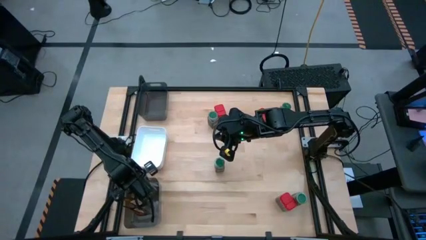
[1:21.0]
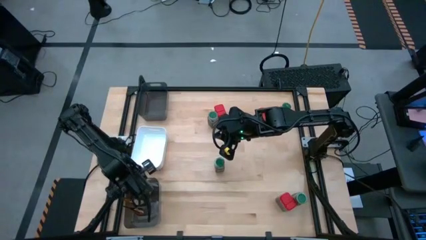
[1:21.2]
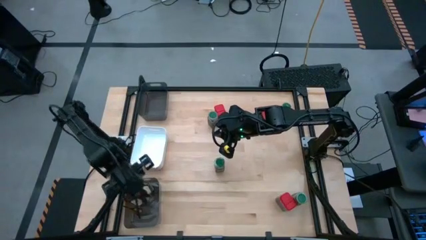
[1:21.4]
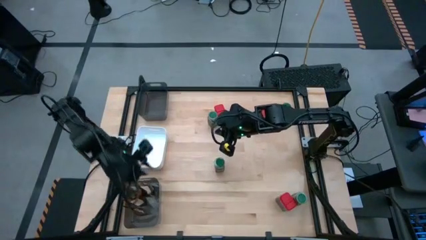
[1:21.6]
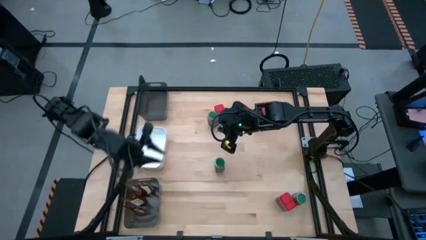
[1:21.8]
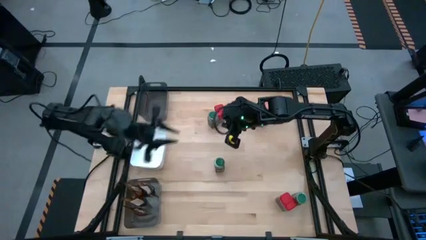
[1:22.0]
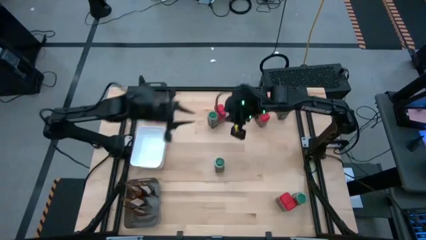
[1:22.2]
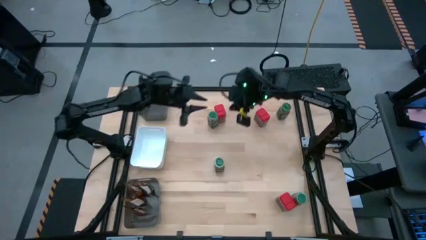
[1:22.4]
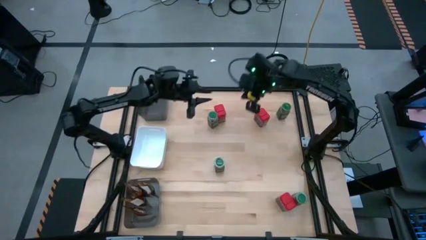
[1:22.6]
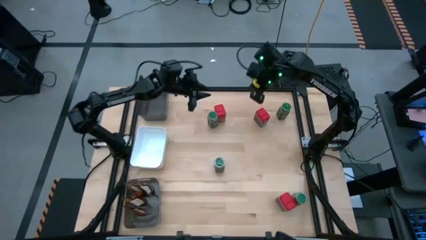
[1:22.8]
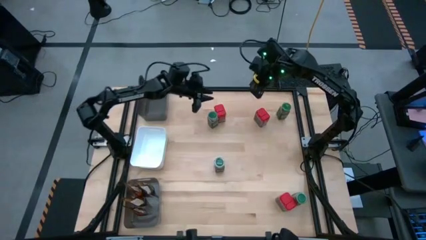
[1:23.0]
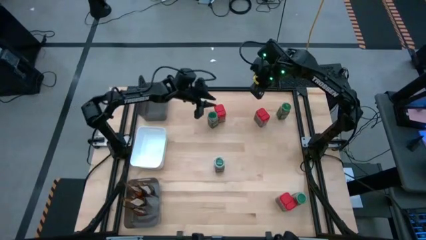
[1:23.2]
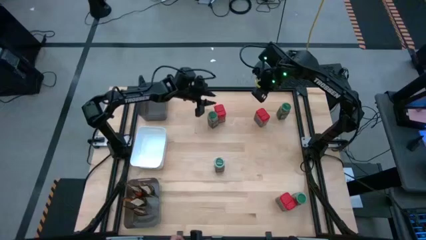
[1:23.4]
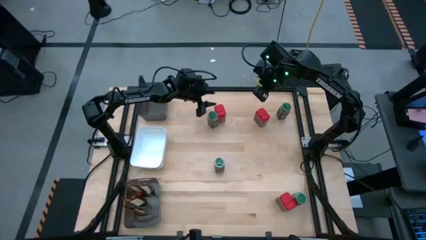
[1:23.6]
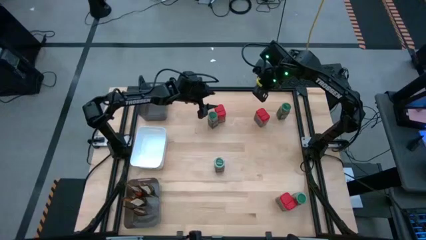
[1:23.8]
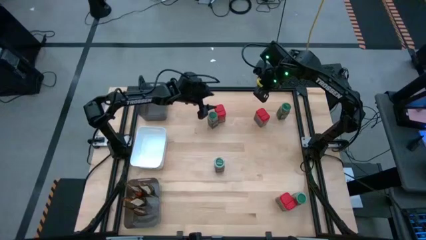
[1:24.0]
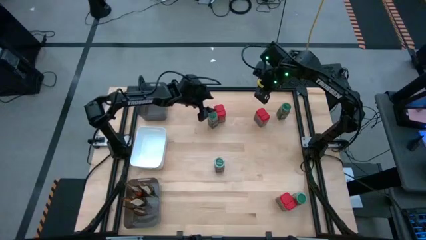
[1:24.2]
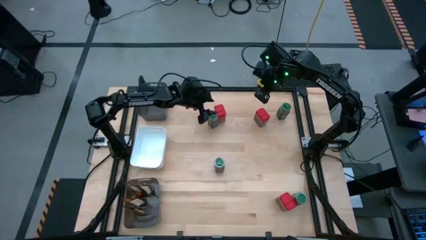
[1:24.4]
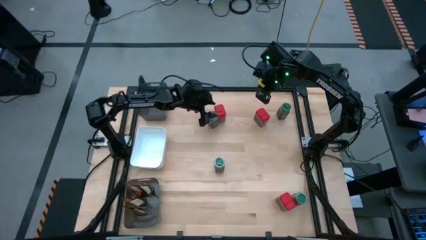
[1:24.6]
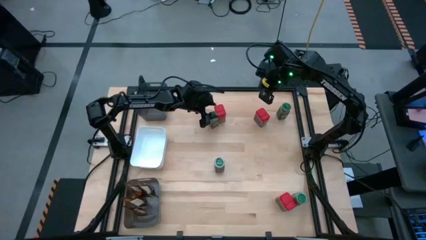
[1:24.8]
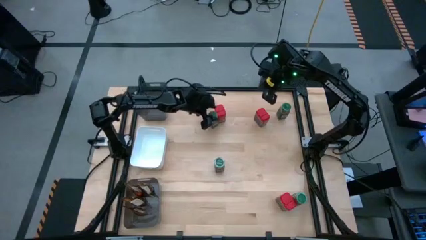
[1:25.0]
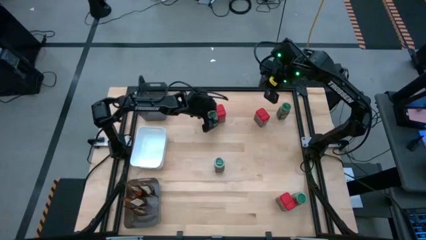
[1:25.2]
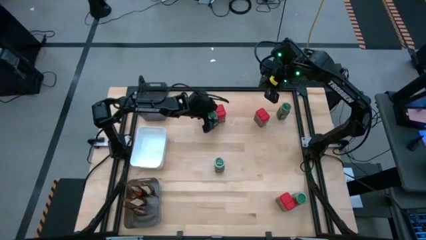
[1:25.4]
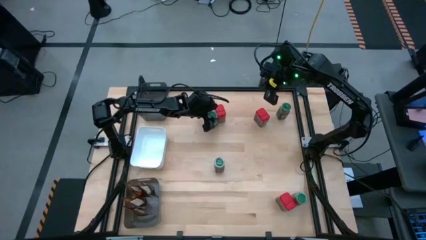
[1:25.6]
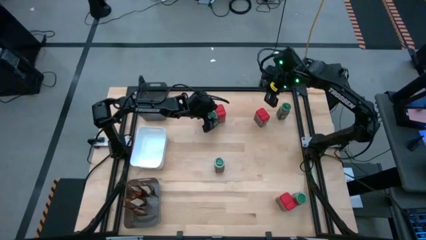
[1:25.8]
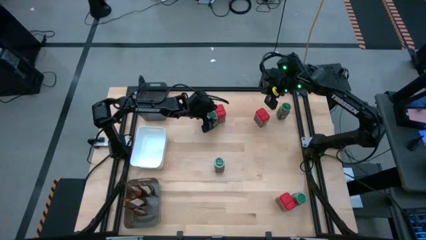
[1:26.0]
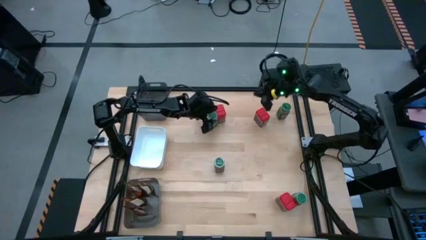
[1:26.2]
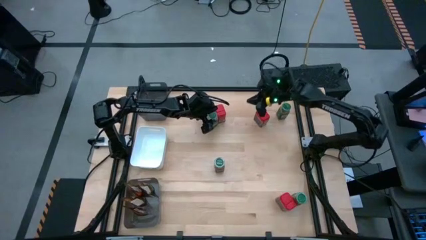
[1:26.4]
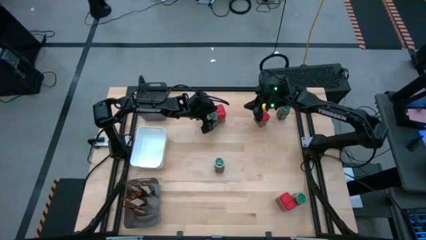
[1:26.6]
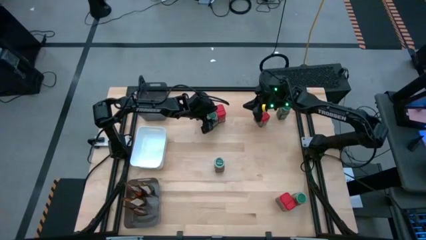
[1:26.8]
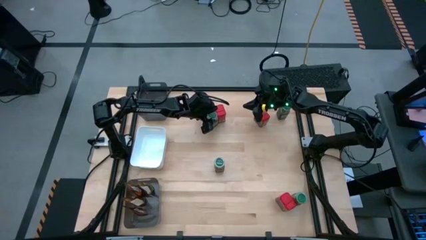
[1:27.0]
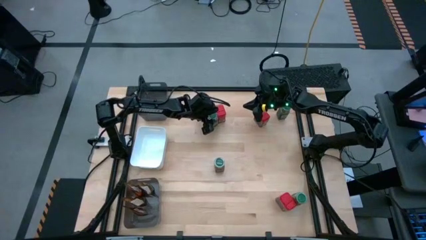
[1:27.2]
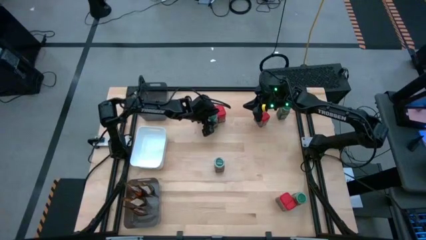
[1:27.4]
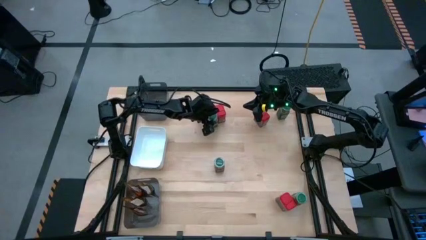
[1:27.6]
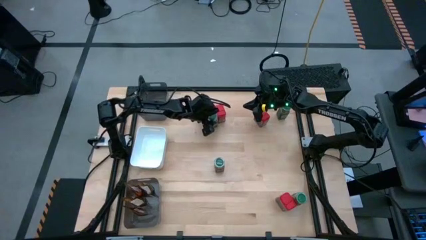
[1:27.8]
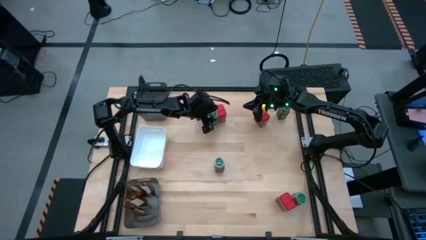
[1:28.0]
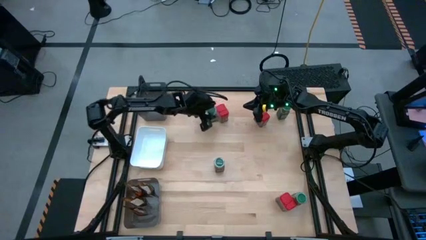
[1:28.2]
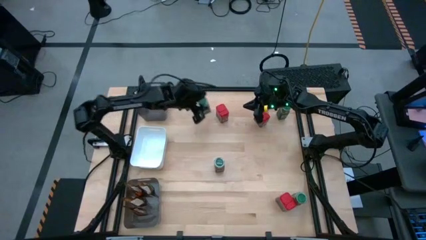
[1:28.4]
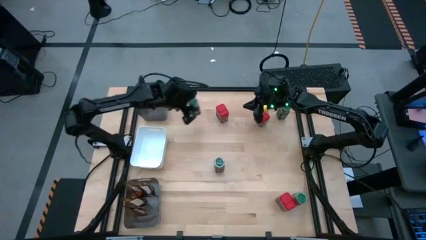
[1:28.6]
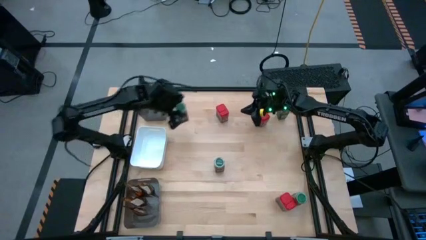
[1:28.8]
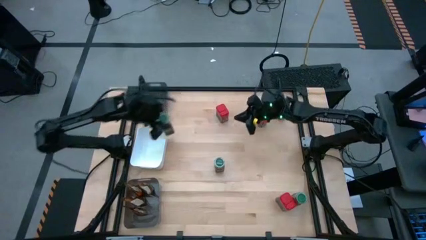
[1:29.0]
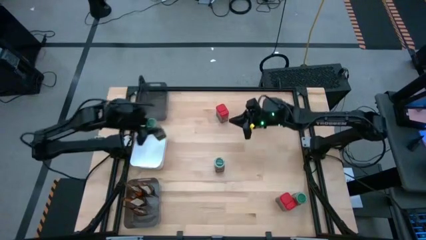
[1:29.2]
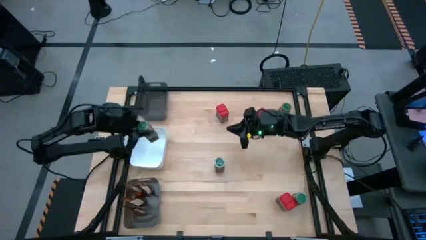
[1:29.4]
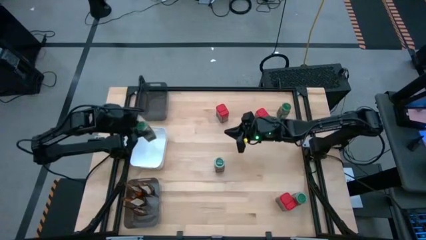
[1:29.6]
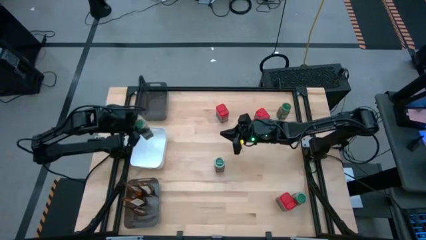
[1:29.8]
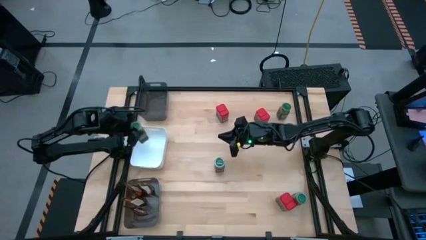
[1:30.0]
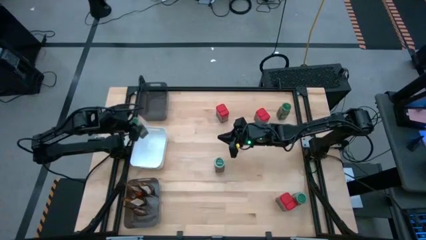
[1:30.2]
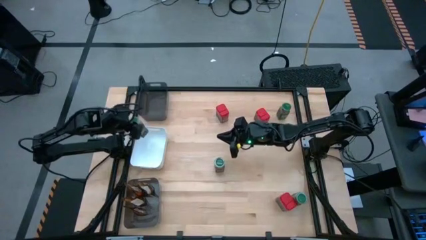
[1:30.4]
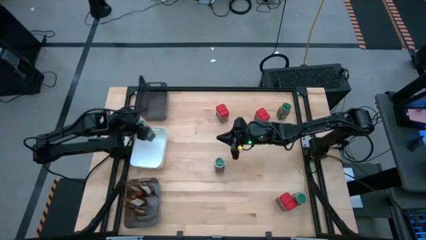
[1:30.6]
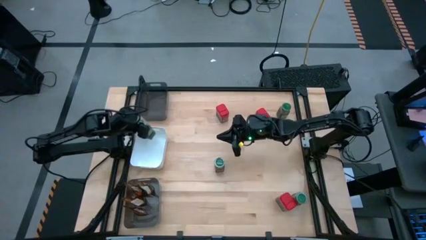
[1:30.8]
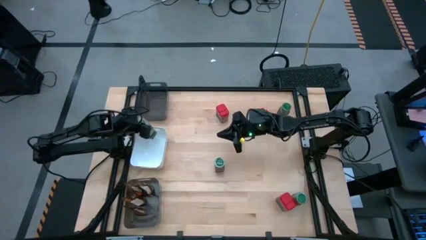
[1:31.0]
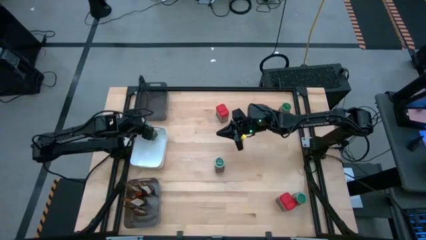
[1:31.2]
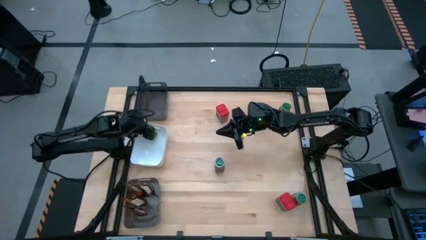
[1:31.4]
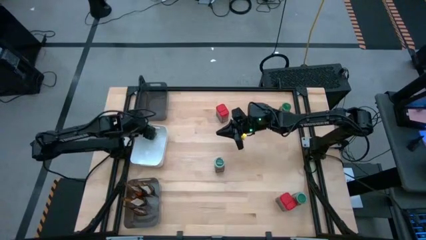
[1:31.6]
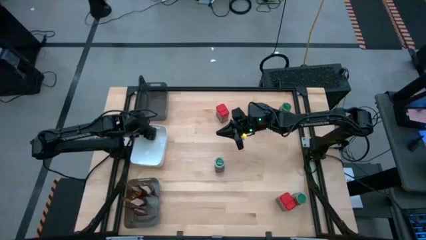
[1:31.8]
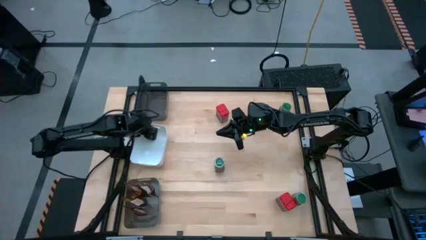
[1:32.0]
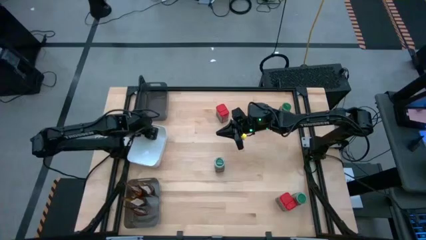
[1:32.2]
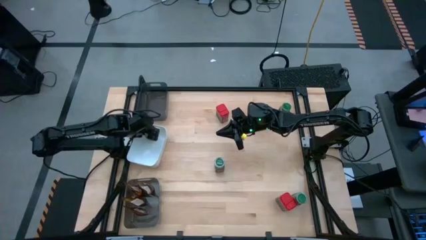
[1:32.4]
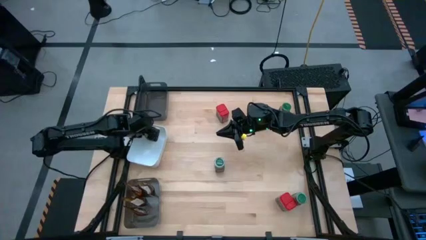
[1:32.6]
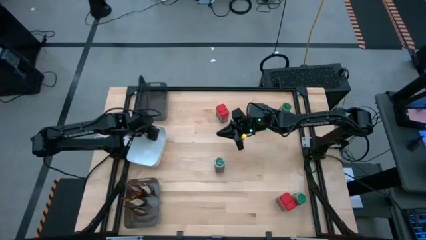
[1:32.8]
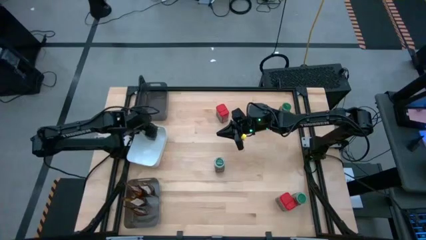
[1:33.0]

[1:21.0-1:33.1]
Task: Sort spices by type
Put the green seasoning bottle into the white bin

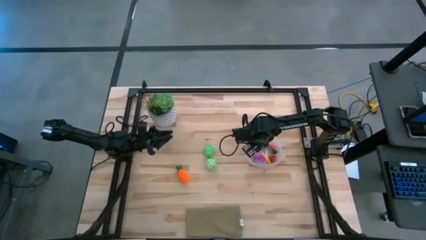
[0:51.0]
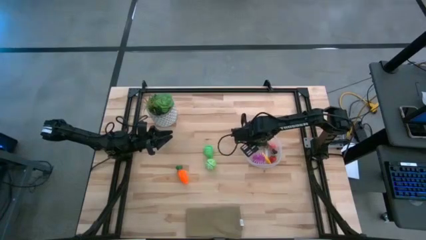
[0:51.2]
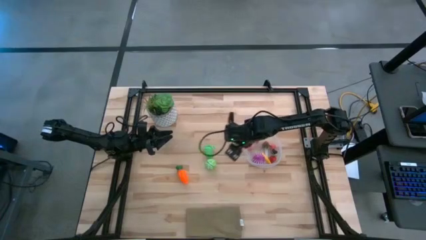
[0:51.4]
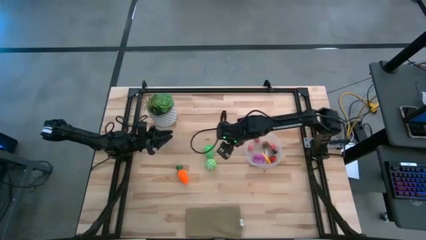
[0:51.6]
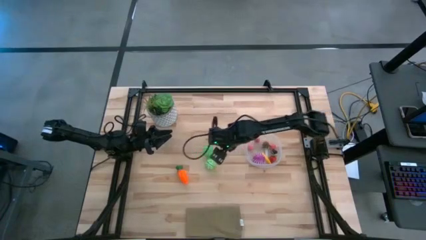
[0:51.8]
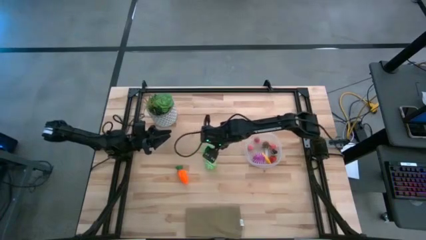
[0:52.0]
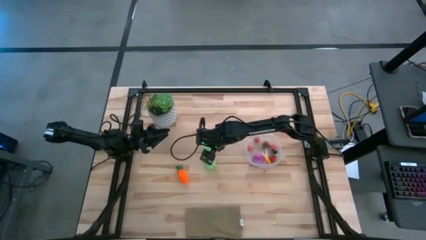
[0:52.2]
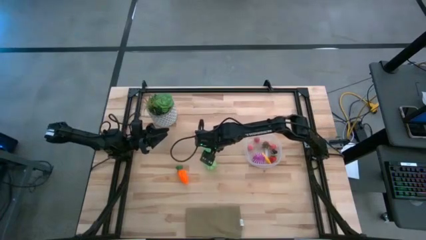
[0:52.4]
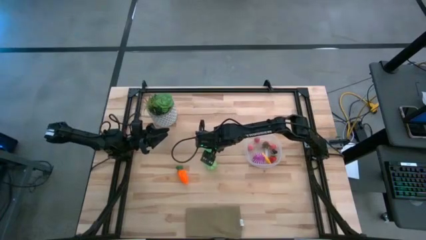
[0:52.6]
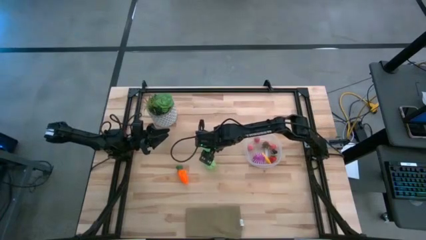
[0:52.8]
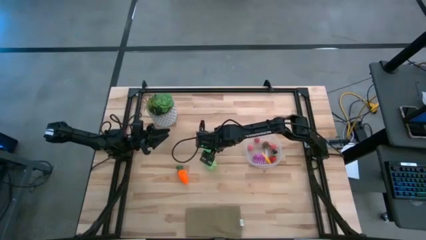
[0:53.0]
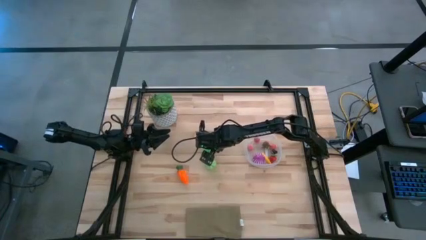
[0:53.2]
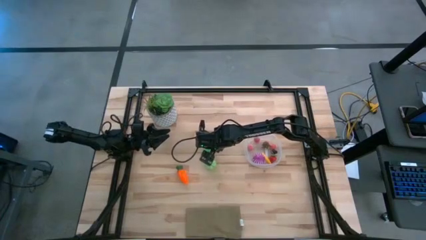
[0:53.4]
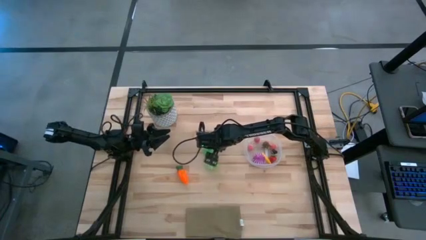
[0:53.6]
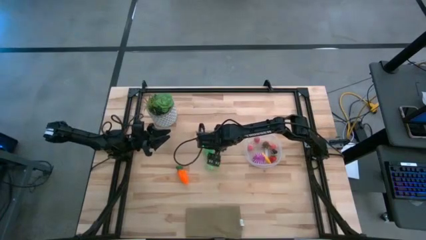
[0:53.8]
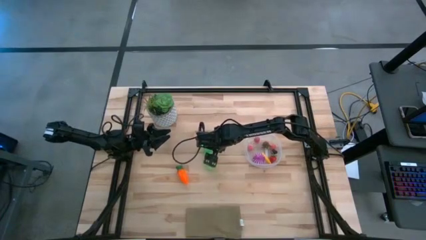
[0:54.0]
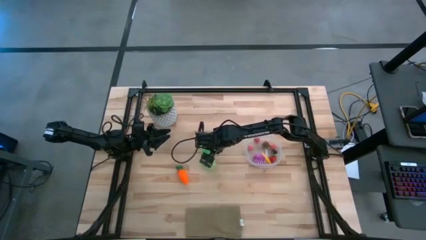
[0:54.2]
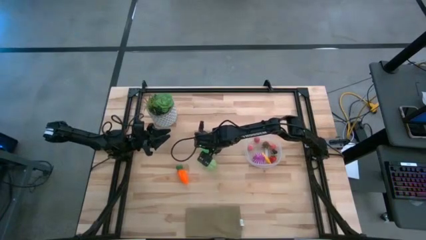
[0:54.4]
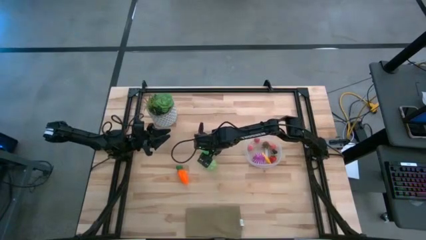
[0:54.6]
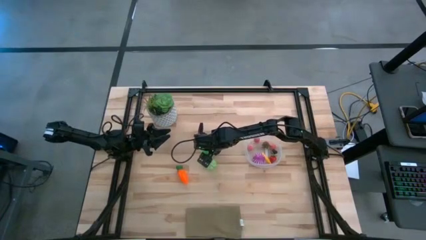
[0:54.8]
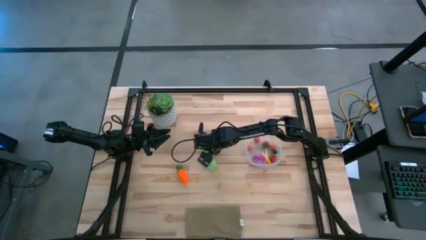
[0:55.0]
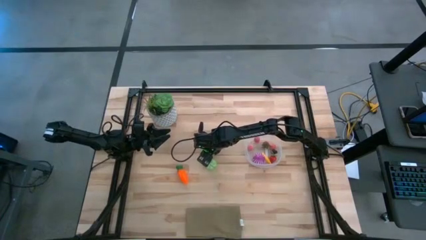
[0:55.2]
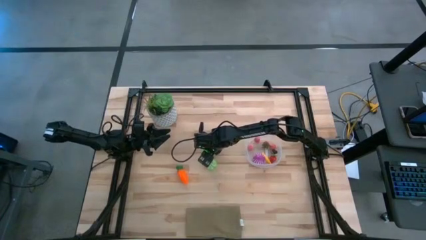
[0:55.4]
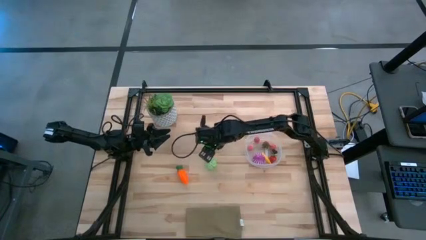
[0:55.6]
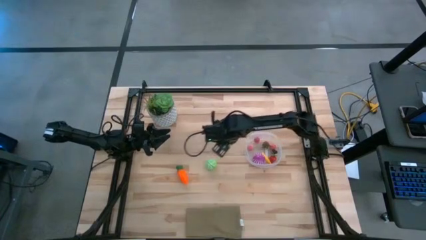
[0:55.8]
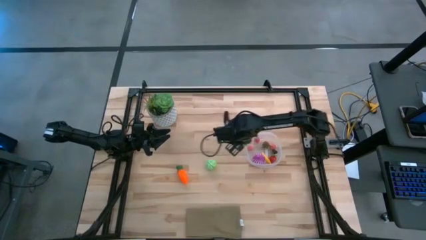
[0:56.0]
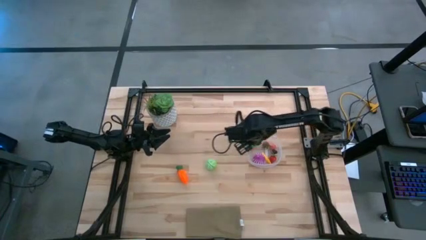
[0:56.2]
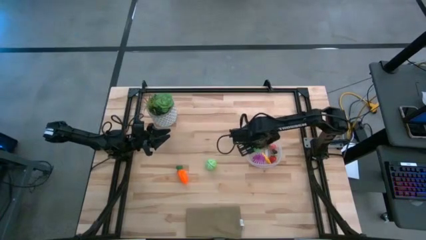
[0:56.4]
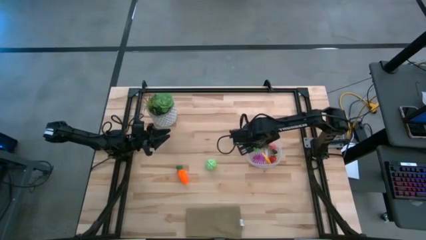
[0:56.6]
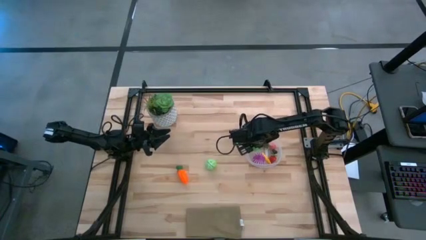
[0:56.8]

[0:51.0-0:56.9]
Task: Pick and placing Produce into tupperware
Put the green pear into the transparent container
